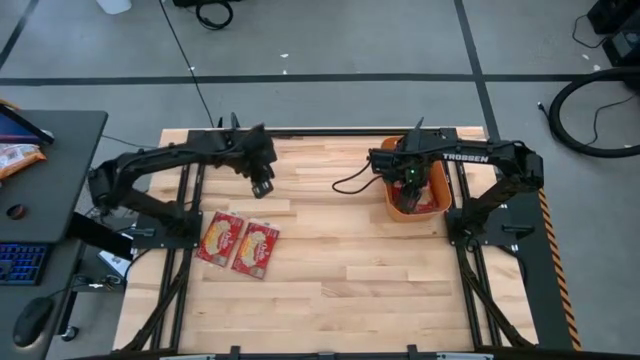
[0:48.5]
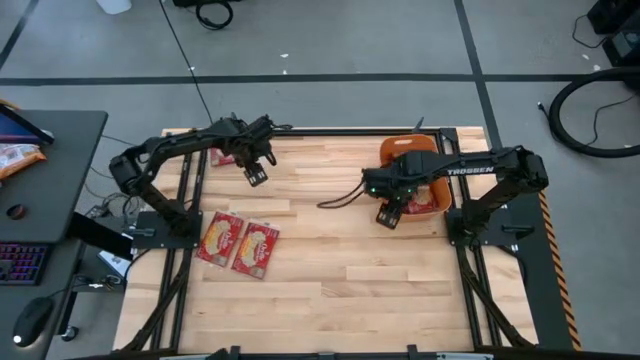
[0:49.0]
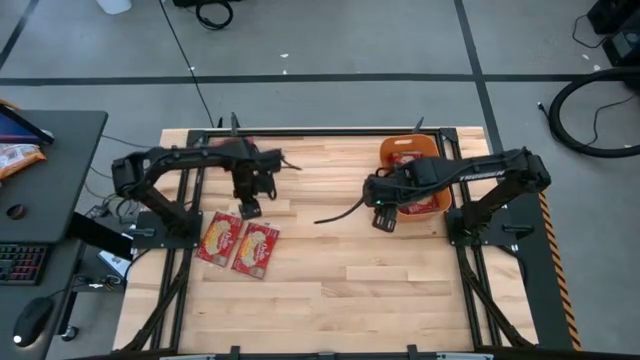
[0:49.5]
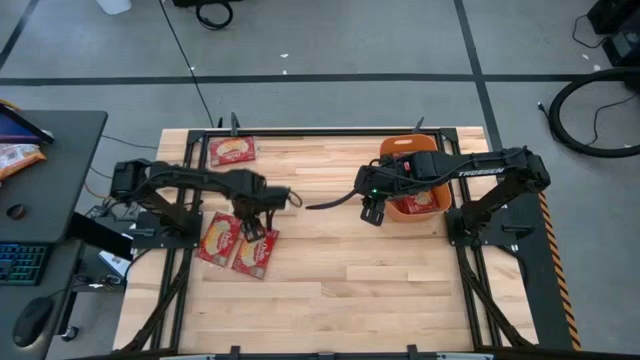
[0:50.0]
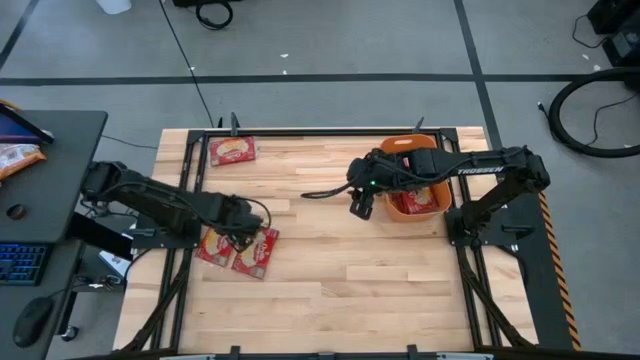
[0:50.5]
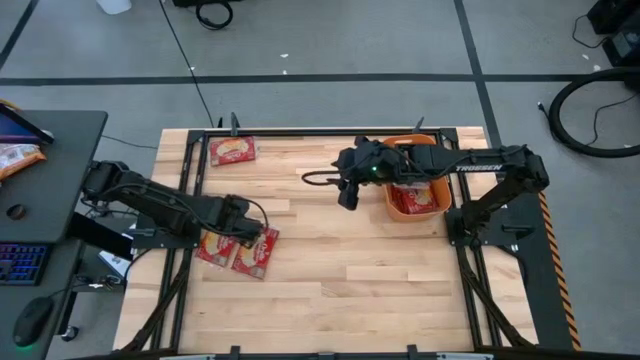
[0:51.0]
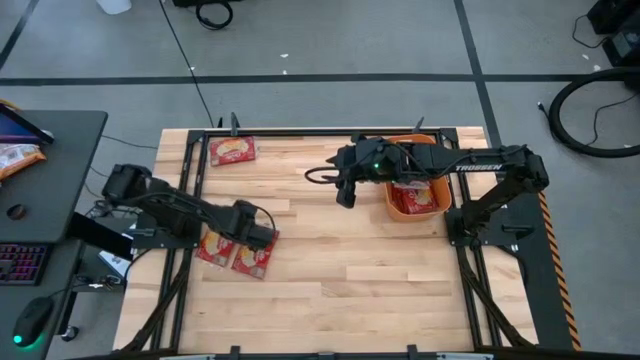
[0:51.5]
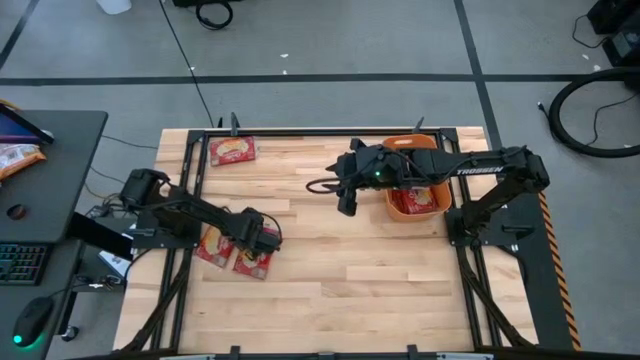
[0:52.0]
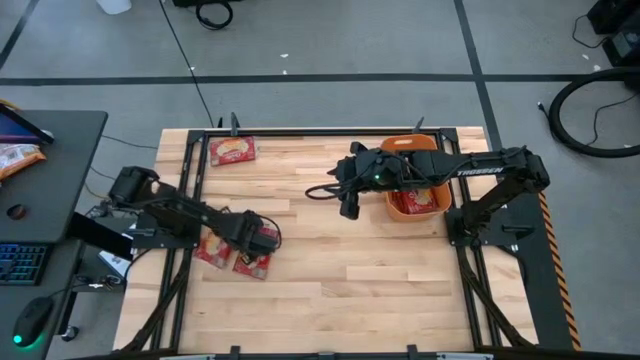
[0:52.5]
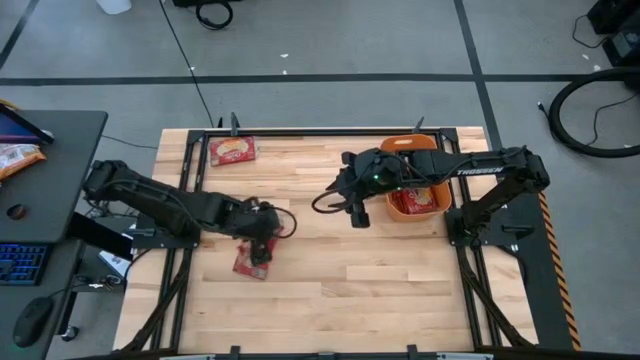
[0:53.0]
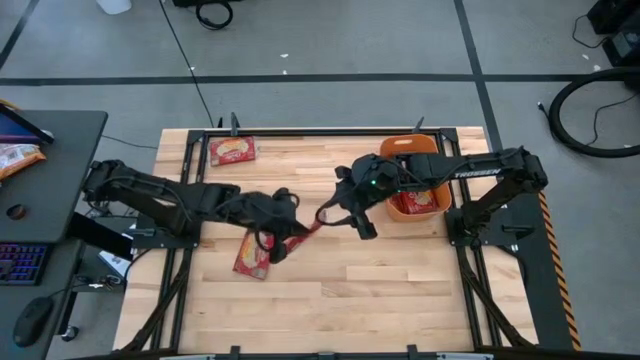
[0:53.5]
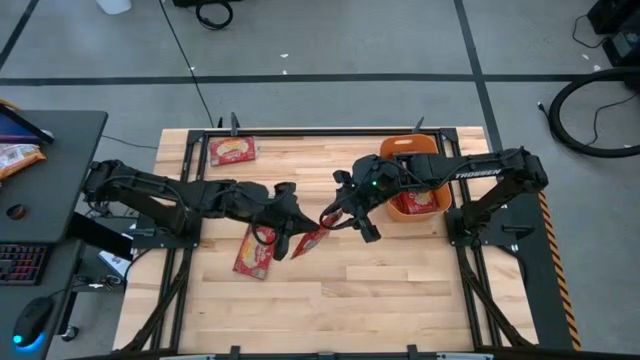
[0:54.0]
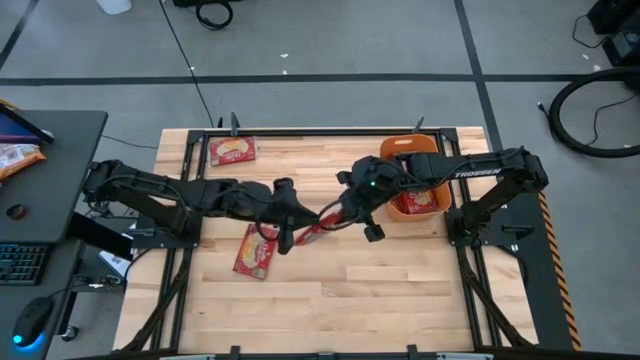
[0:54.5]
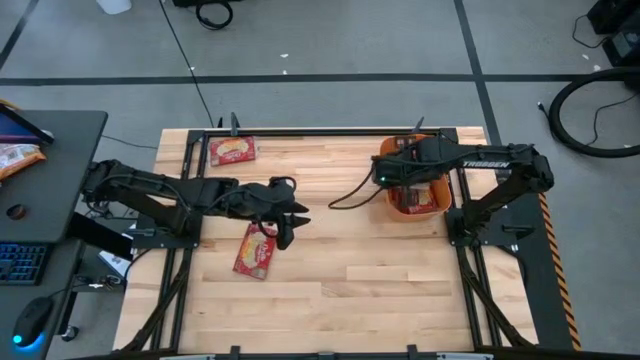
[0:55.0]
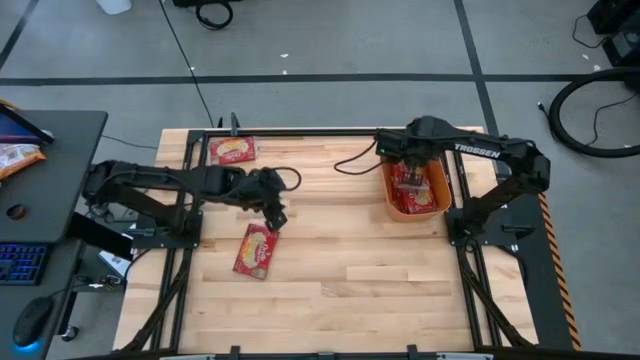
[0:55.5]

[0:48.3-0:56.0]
Task: Sort popcorn bags into baskets
Put the red popcorn bag into the orange bin

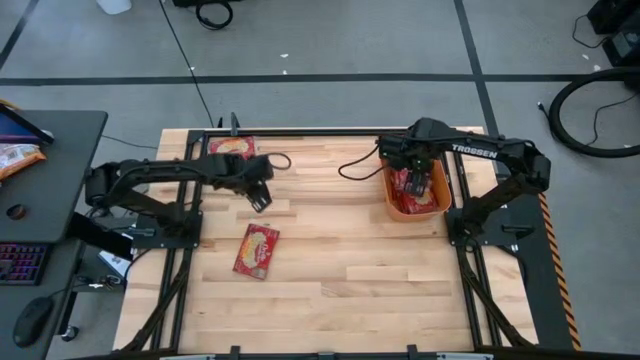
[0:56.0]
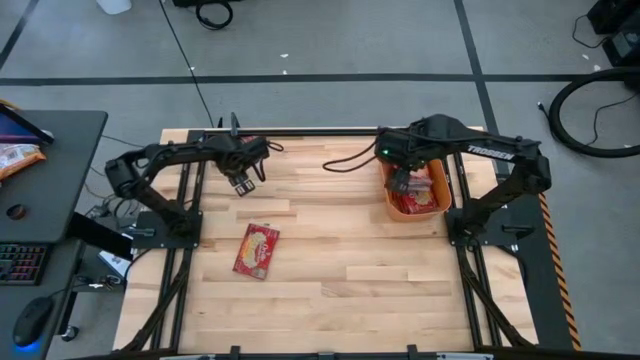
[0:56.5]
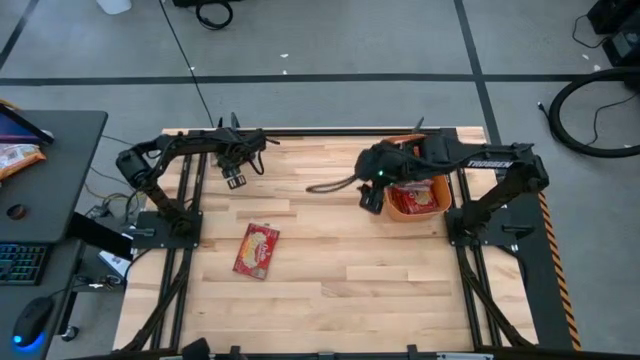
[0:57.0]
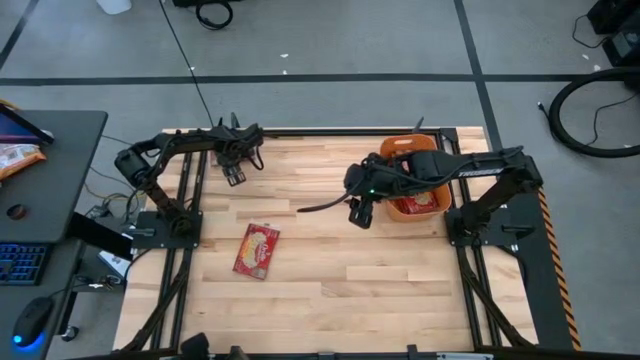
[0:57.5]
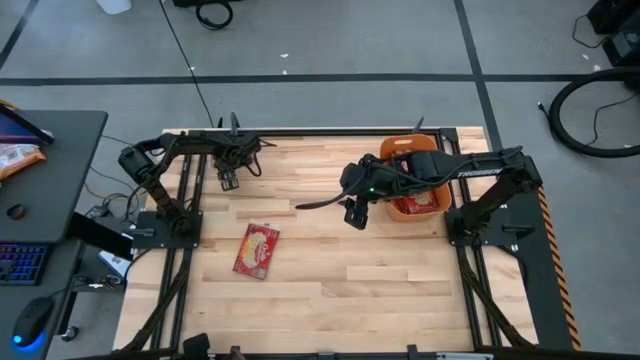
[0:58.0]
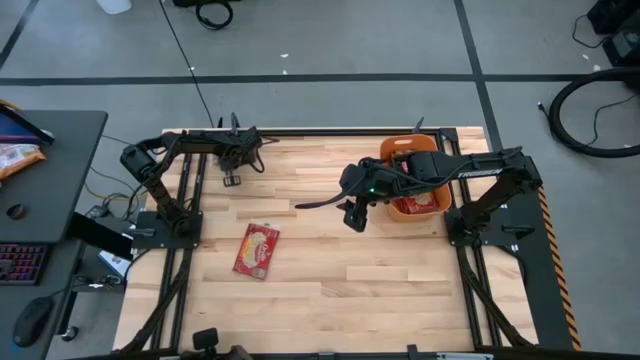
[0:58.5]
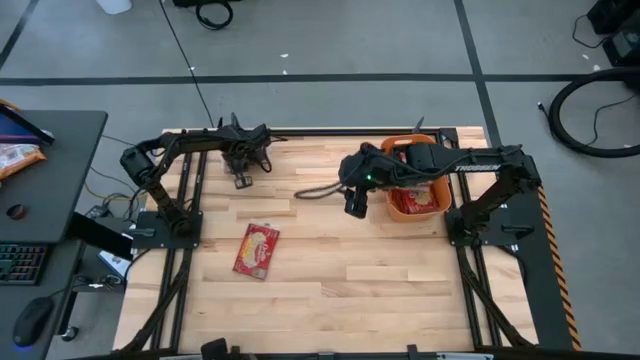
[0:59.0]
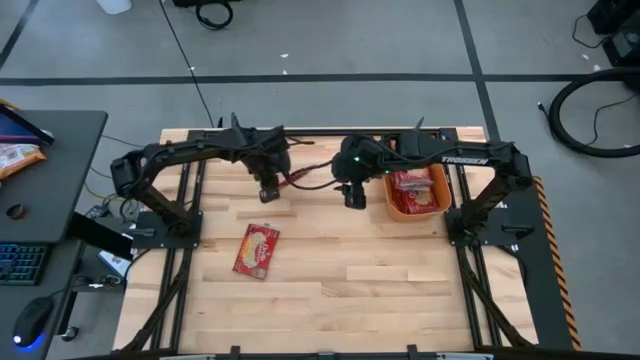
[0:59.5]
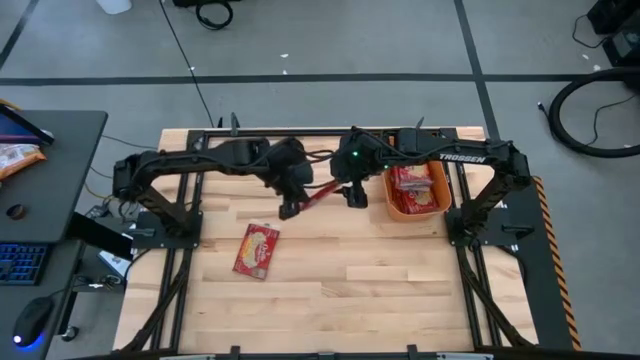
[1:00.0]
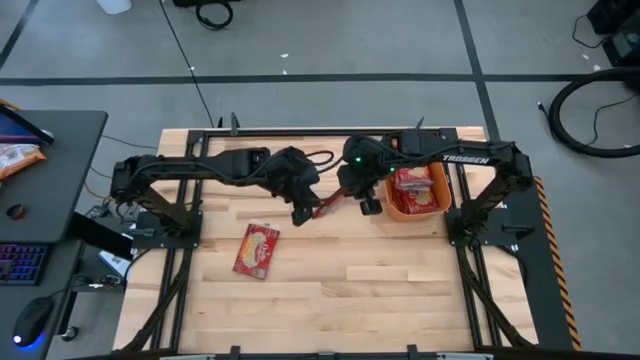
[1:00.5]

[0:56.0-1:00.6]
Put the red popcorn bag into the orange bin

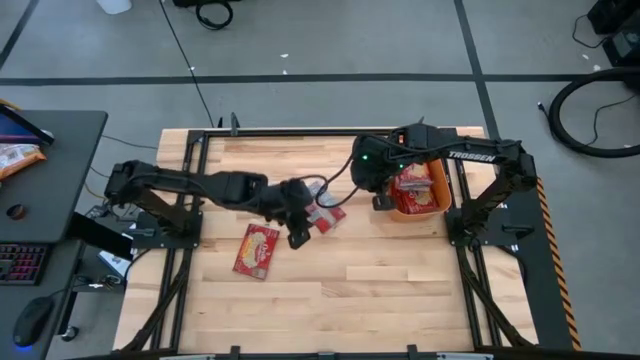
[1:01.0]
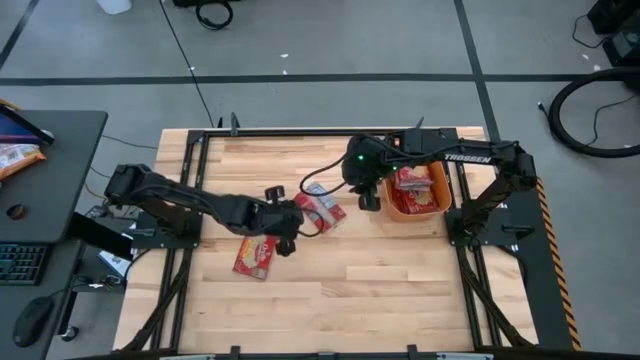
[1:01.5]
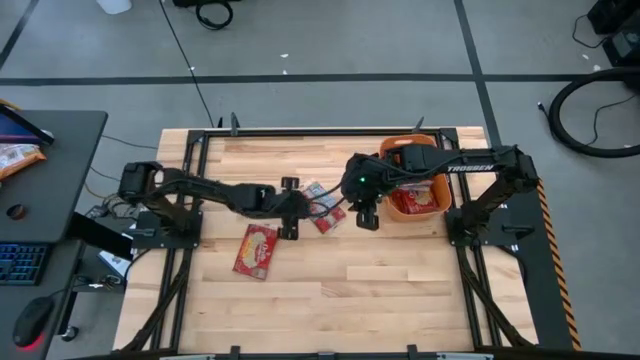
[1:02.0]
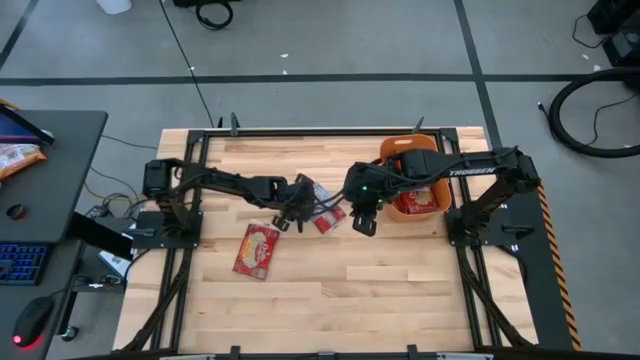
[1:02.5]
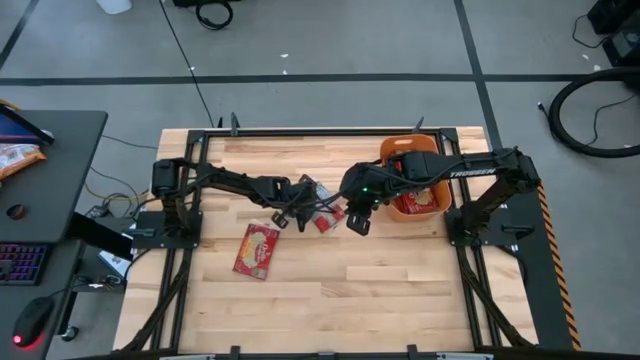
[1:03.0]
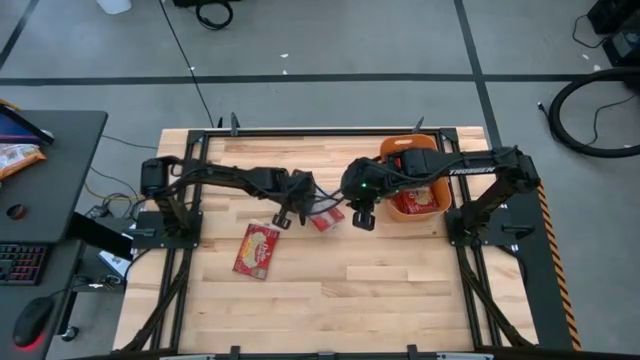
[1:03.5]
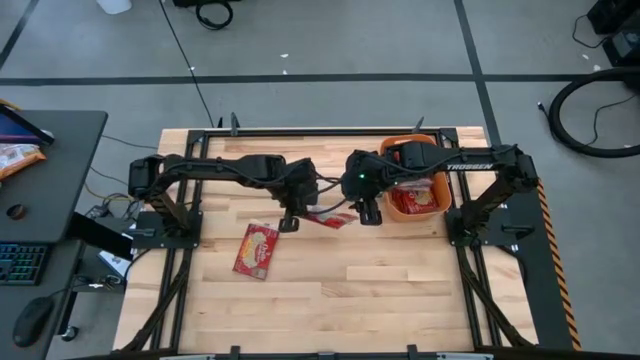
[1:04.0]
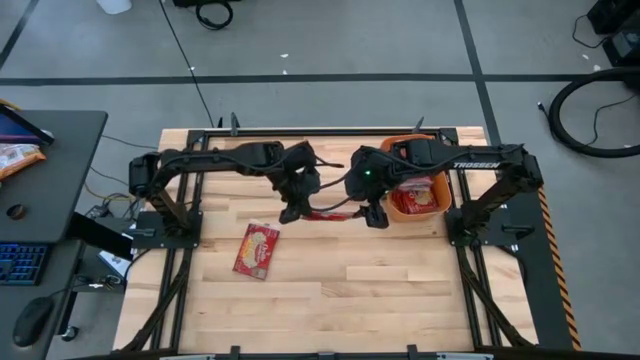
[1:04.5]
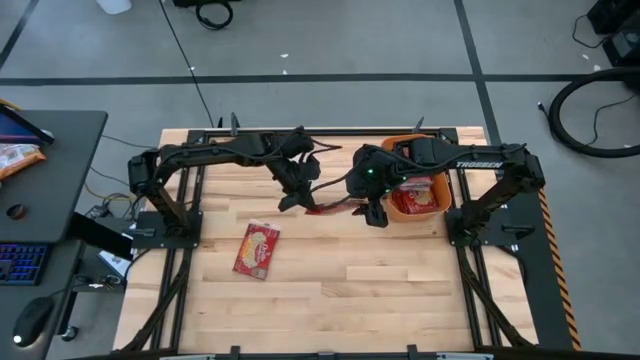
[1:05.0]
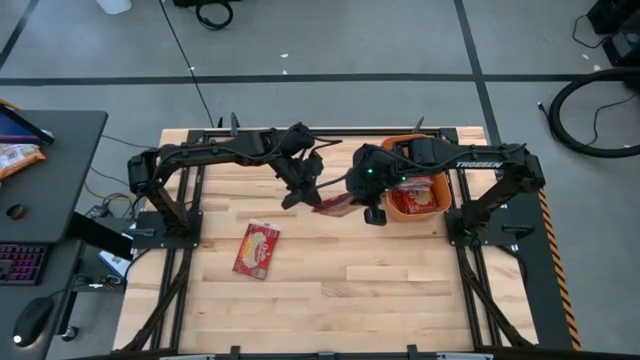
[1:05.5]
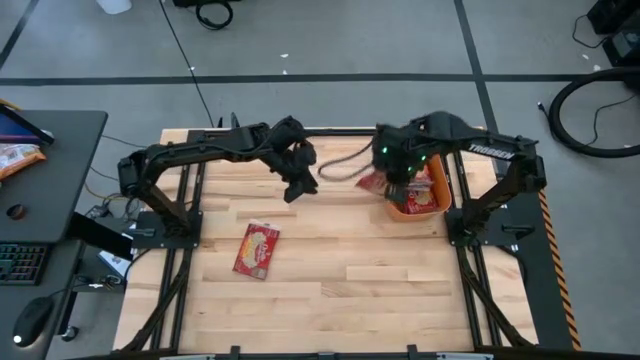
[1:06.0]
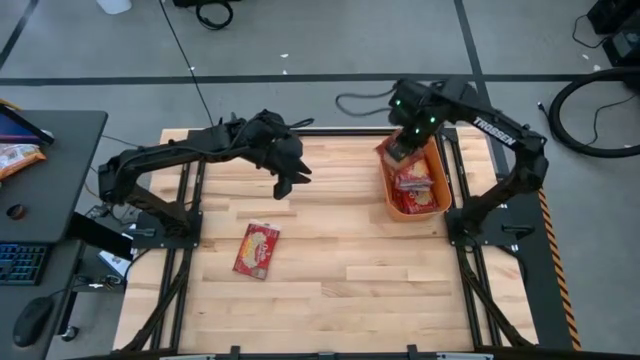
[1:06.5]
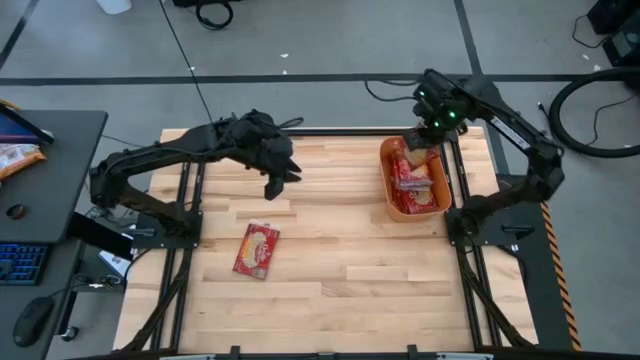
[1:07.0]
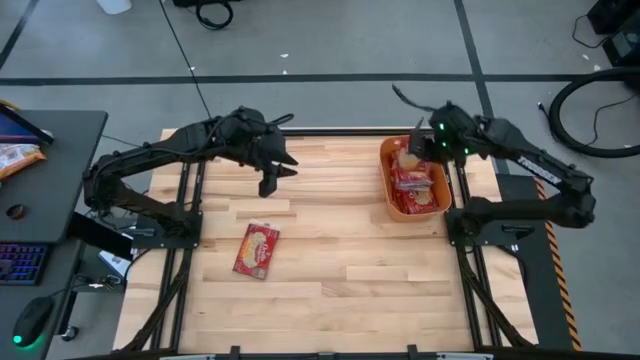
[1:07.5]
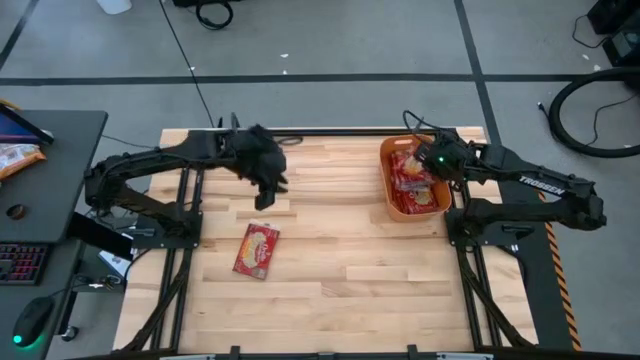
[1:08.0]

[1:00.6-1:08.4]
Put the red popcorn bag into the orange bin

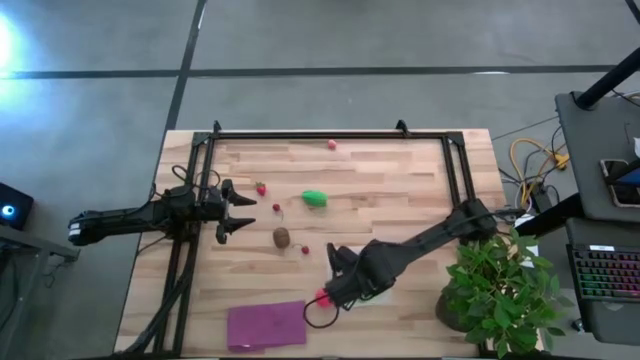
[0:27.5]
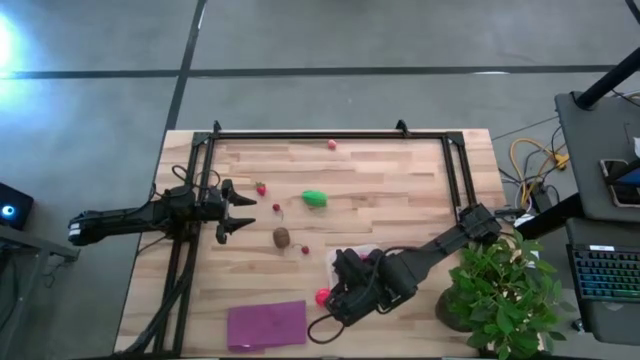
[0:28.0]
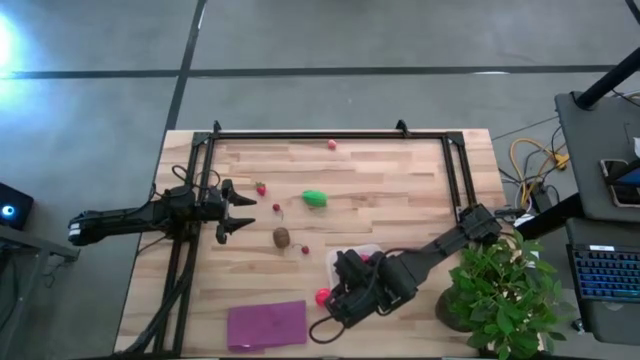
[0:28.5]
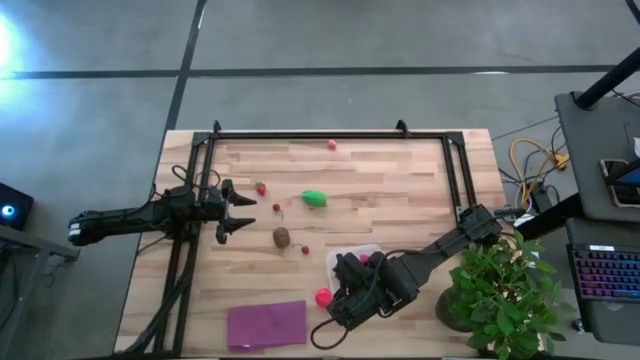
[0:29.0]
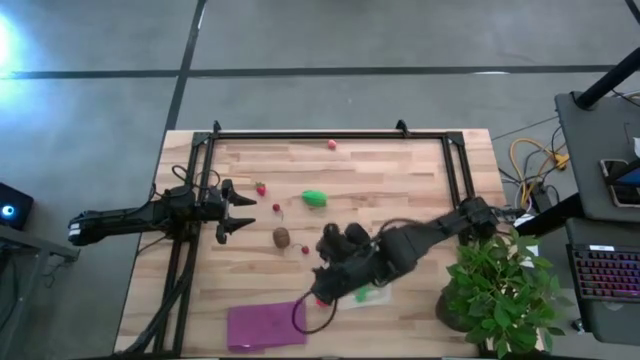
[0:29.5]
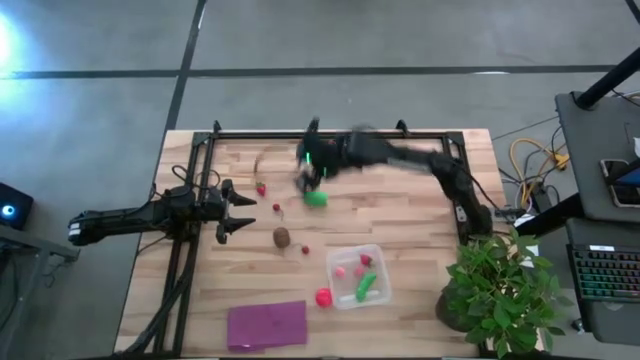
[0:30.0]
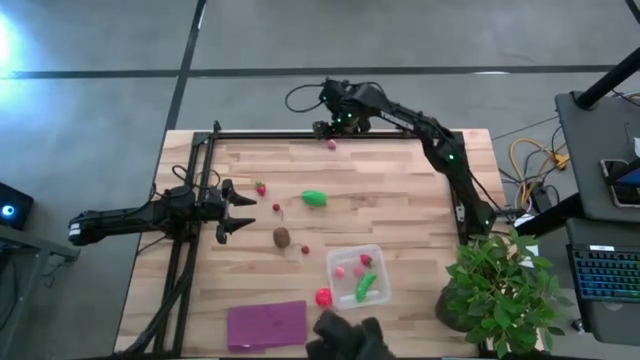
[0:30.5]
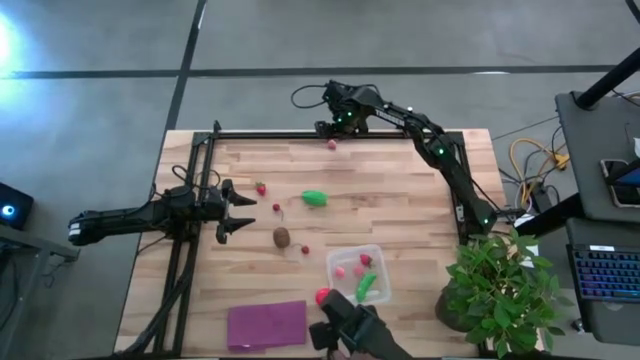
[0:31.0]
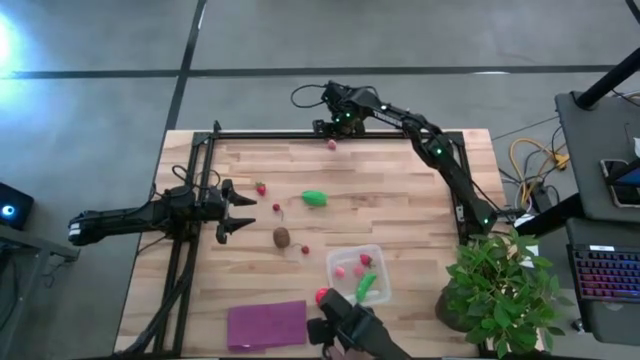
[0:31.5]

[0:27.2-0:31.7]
Task: Pick and placing Produce into tupperware
Put the pink peach into the transparent container
